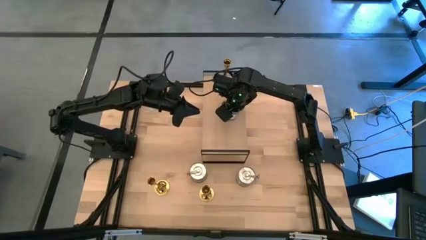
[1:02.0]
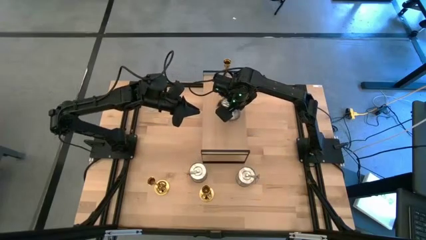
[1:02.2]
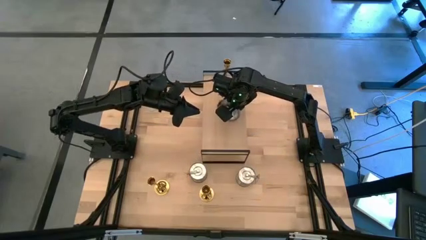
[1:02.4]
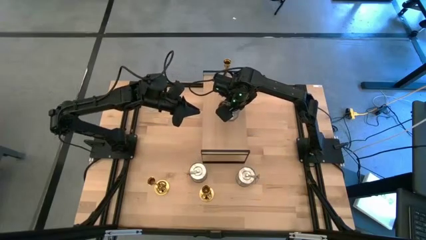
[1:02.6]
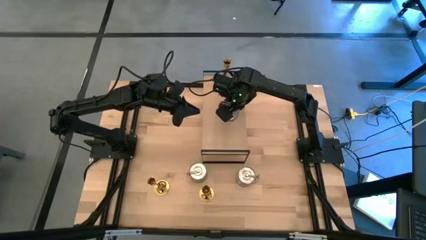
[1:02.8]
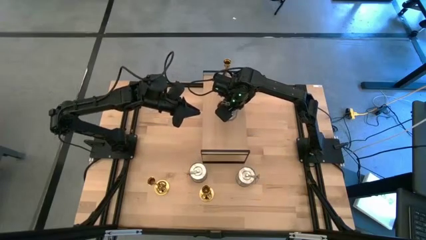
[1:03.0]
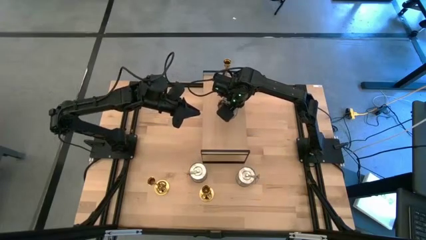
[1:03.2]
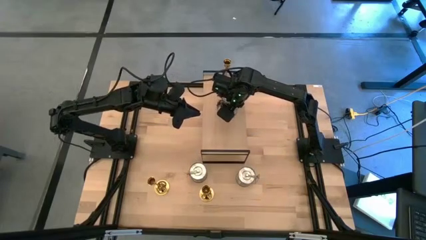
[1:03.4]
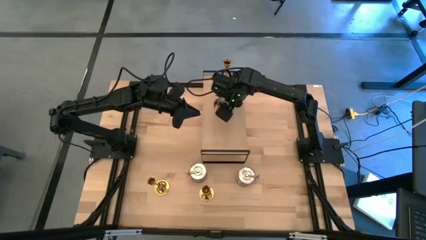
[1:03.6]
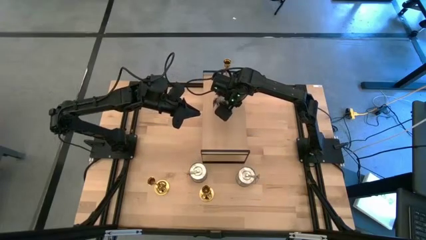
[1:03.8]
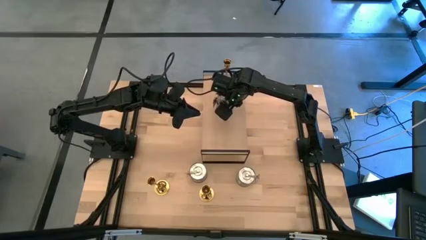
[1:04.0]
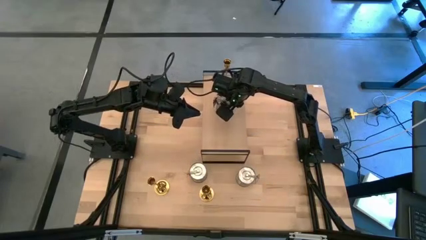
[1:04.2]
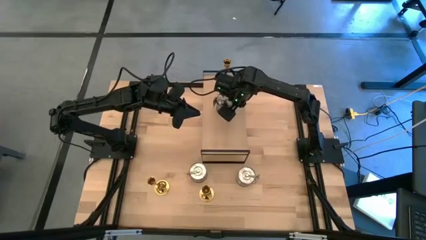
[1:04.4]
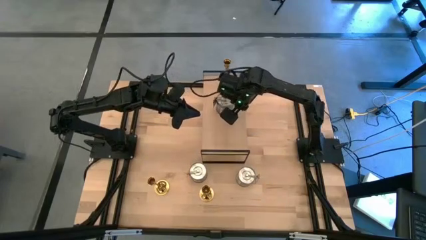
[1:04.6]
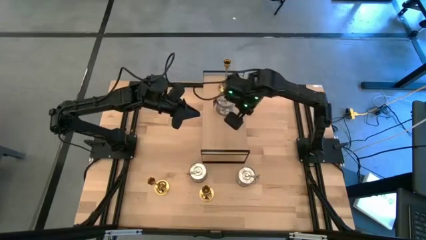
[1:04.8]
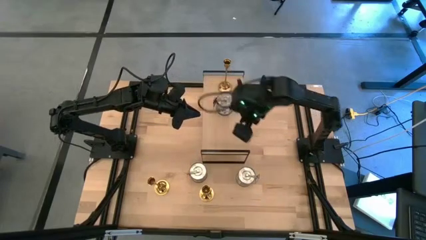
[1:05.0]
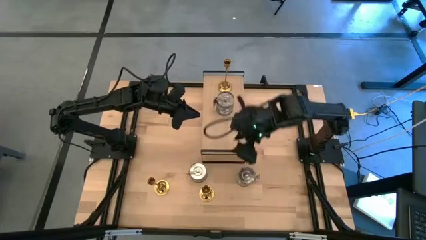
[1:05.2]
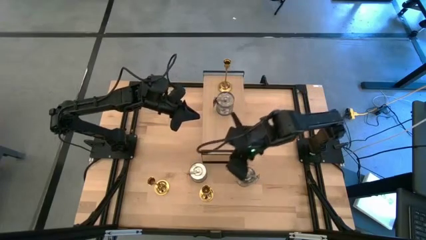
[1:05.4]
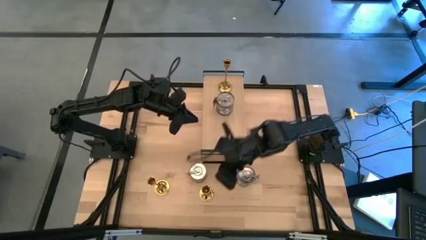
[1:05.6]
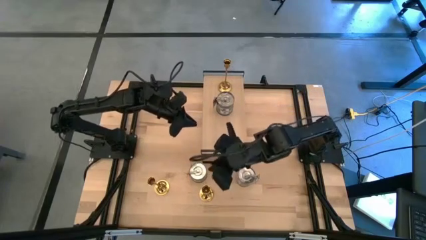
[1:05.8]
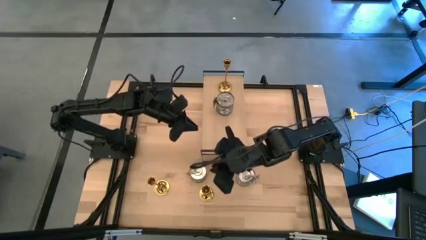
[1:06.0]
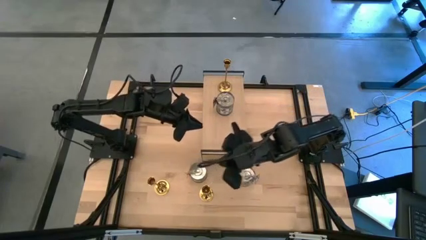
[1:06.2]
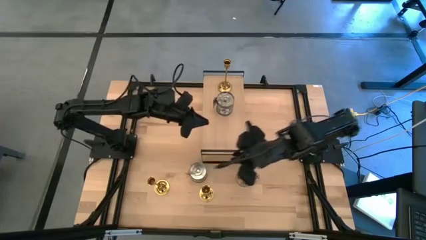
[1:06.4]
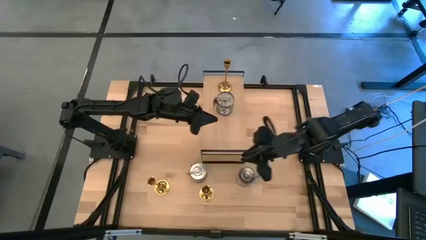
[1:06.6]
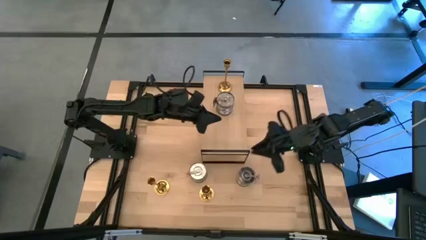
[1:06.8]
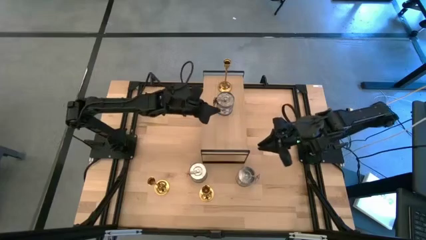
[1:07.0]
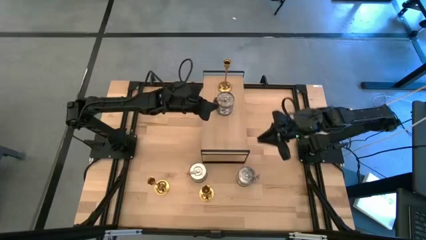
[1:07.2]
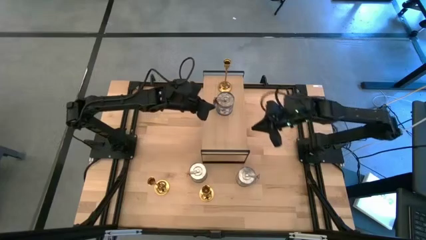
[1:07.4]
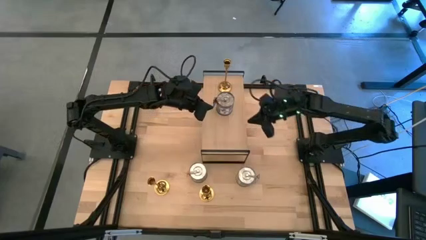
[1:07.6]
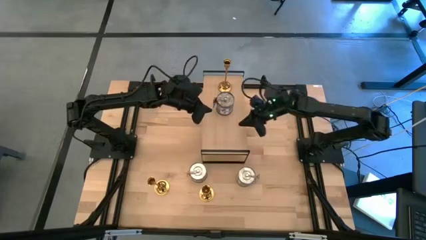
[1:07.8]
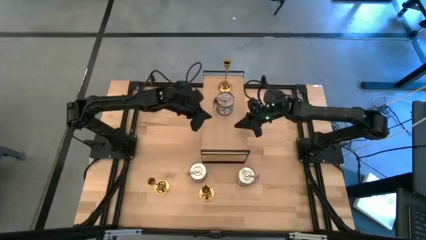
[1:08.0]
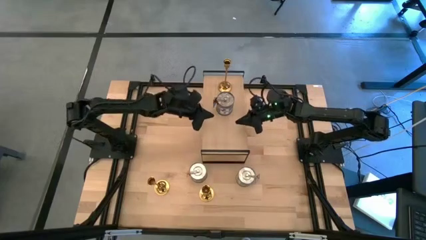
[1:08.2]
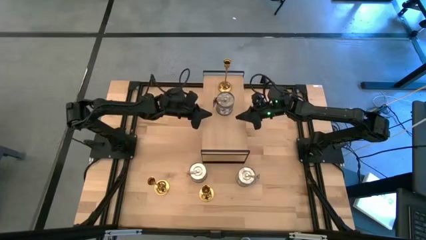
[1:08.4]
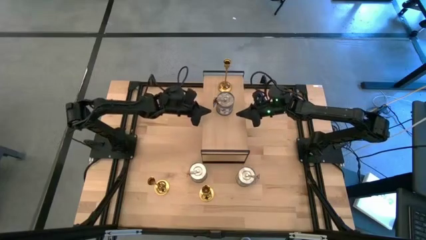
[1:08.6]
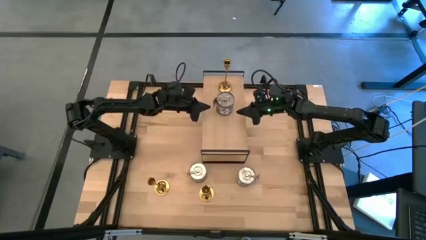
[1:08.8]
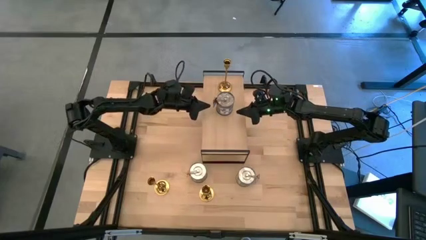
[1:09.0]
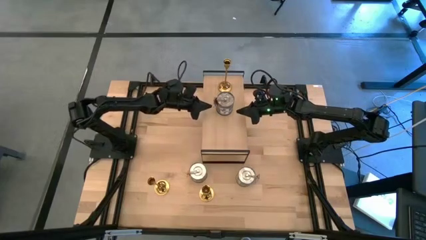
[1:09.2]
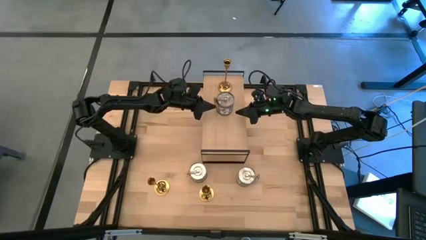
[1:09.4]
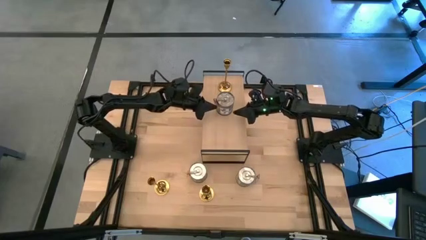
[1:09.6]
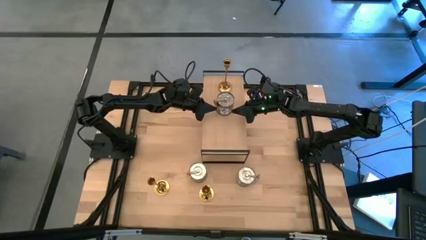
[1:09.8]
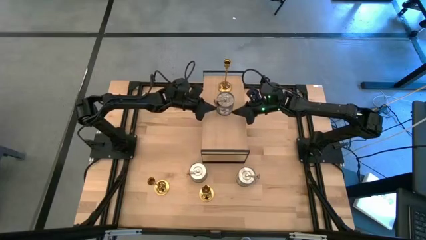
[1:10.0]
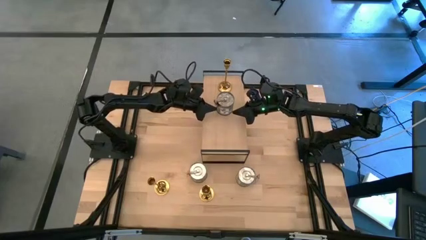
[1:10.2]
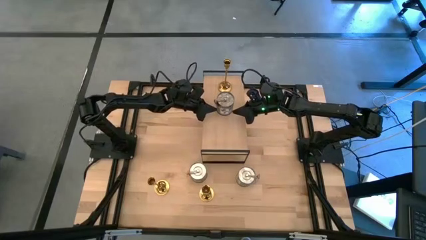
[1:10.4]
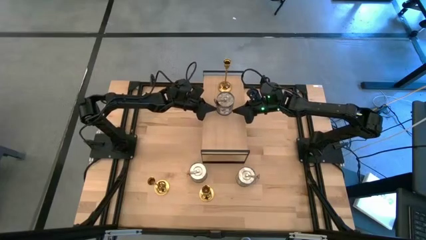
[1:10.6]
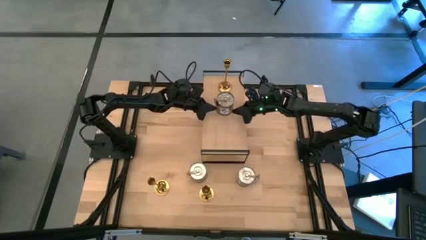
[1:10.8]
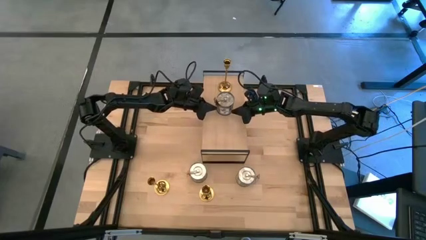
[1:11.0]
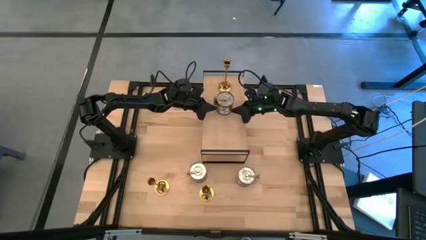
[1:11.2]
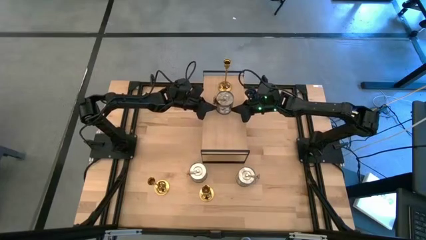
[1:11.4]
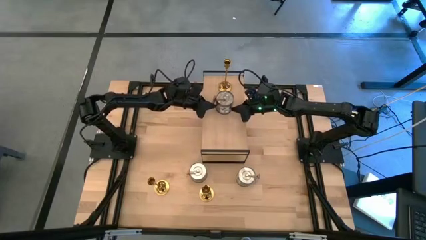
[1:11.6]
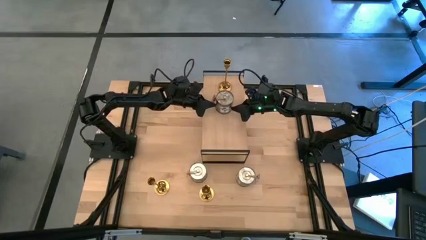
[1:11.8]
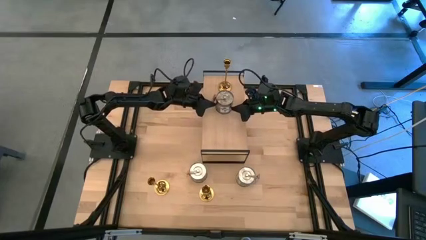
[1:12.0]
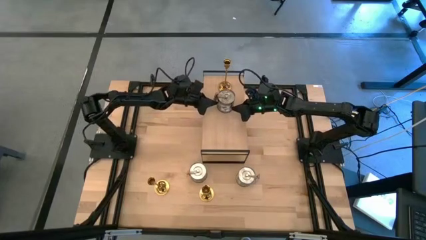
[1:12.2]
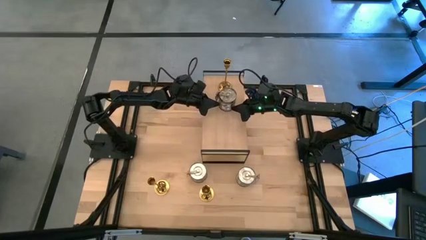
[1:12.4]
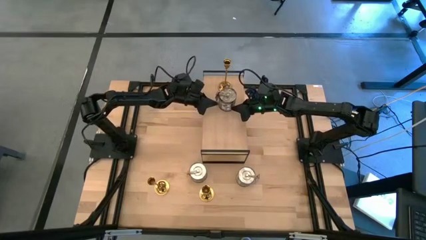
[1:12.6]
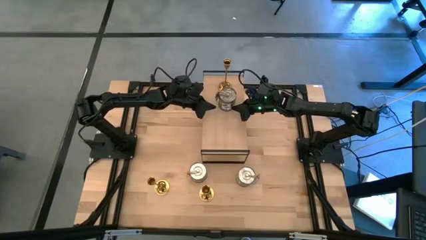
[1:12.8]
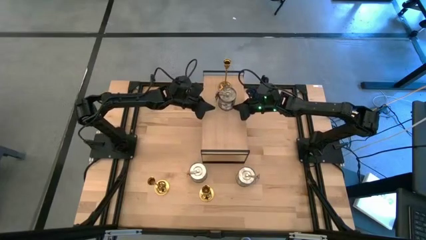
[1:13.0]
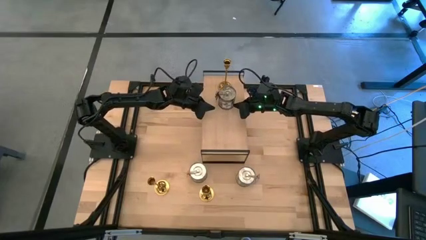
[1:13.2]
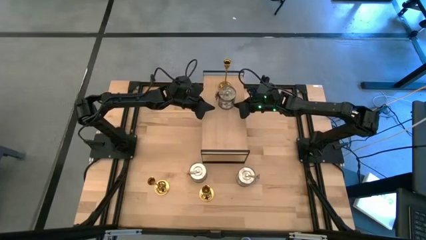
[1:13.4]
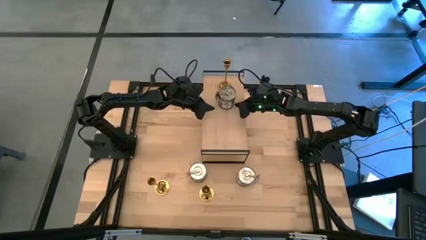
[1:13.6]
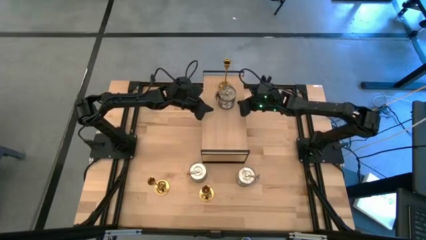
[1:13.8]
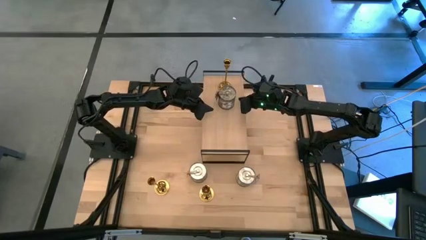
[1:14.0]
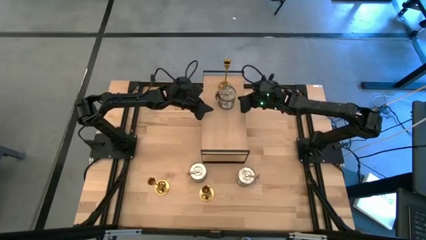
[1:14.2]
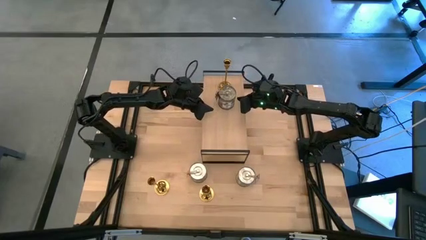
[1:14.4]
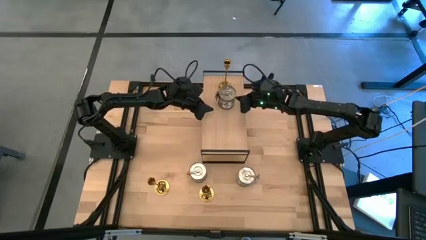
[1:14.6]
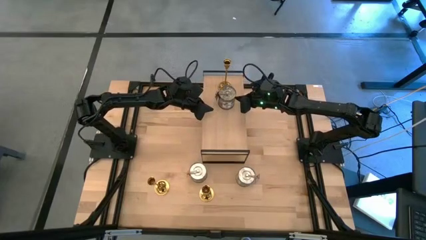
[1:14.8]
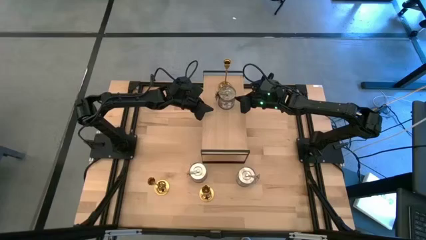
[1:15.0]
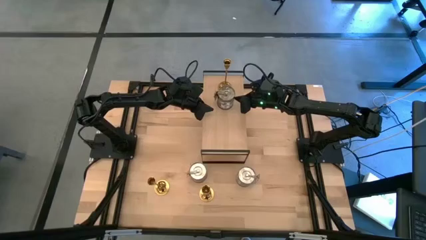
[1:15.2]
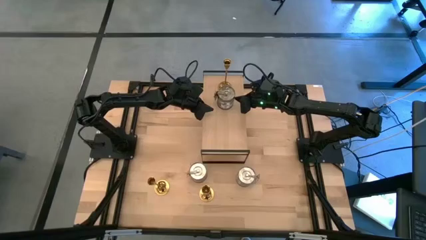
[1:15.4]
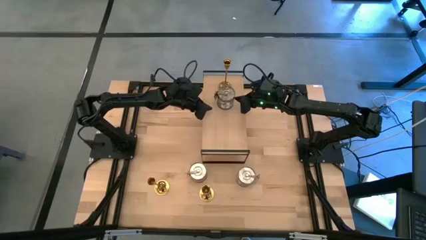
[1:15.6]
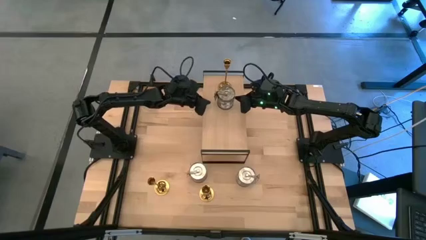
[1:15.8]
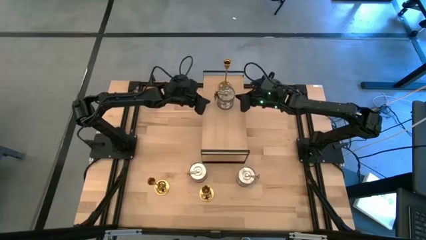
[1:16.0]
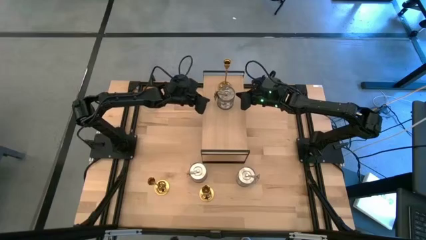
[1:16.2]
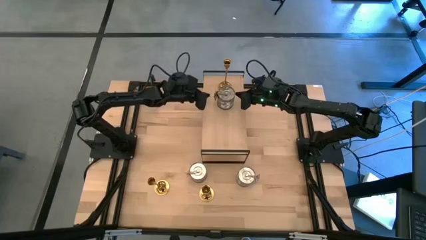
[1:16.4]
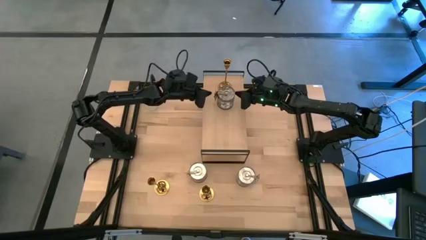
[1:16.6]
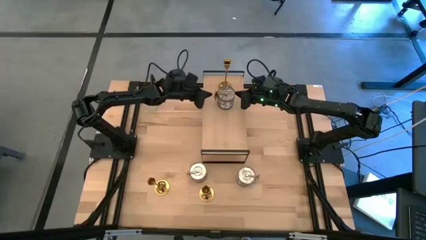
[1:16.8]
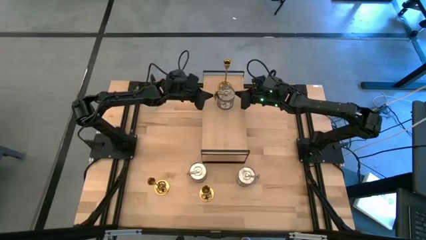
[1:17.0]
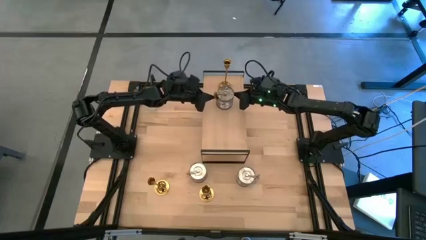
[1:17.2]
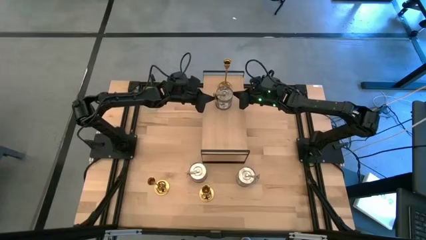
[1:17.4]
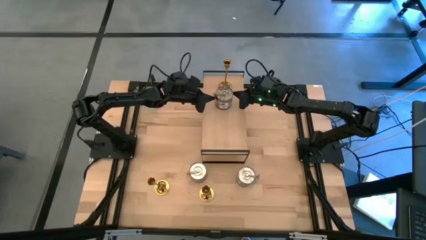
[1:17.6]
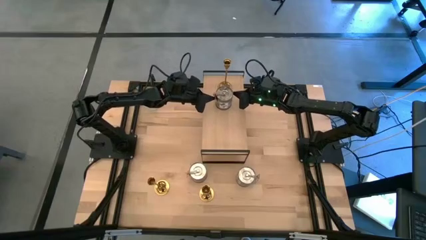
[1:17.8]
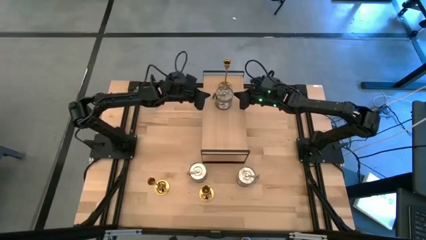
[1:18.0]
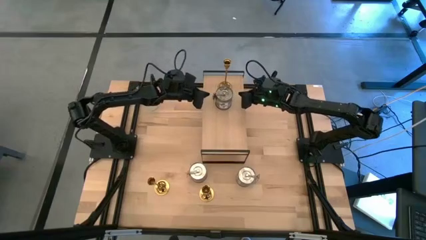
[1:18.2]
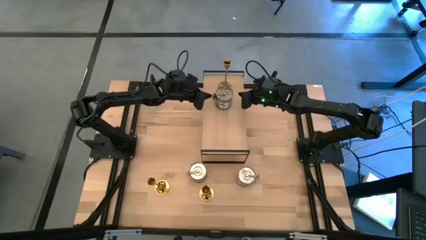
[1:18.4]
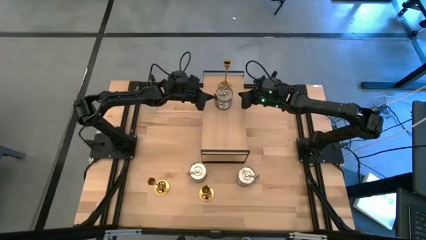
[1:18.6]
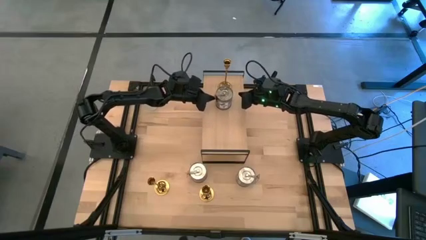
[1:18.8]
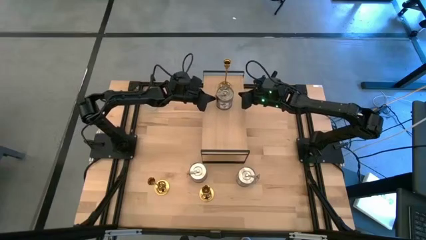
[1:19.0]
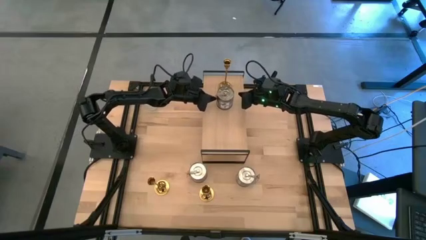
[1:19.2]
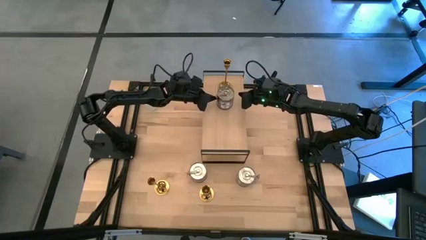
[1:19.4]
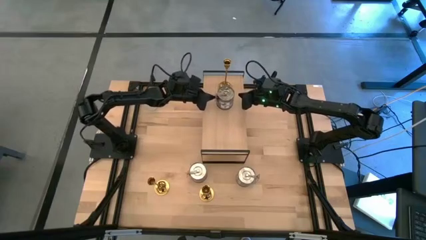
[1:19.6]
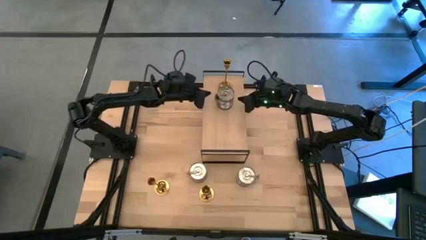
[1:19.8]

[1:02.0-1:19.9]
Task: Pick & Place candle stick holders
Put the bottom silver scented candle on the shelf
